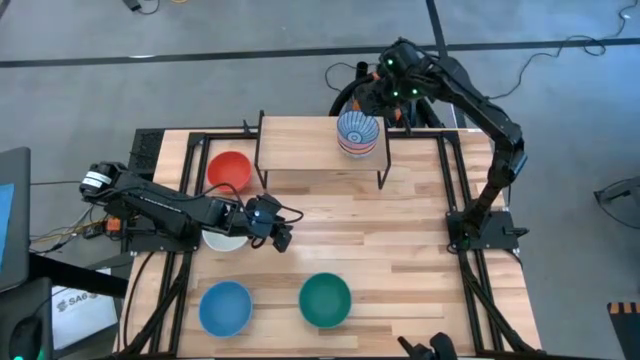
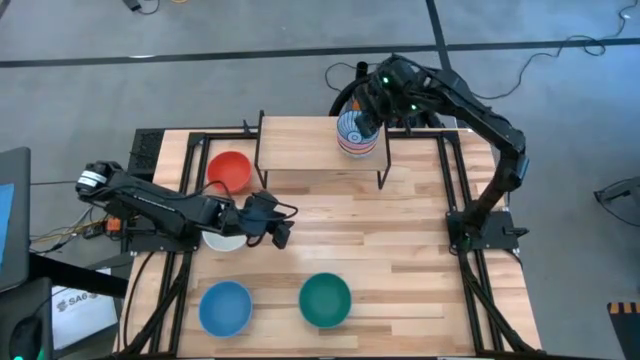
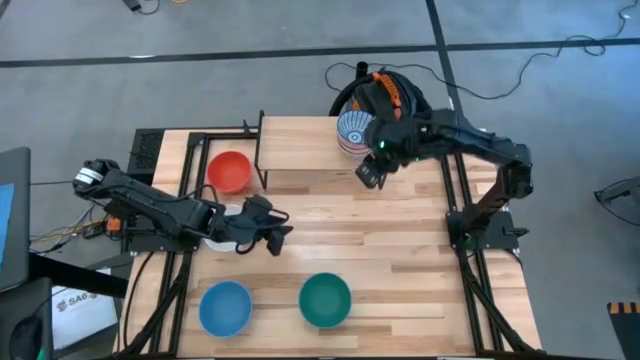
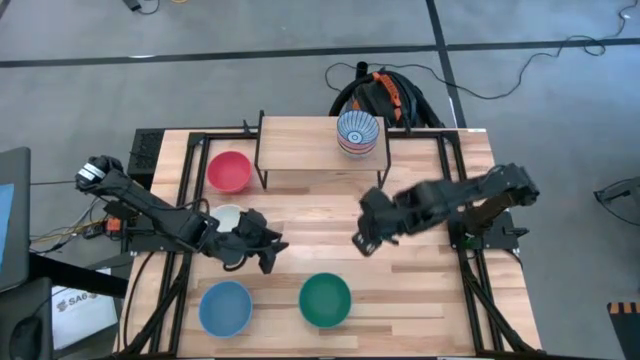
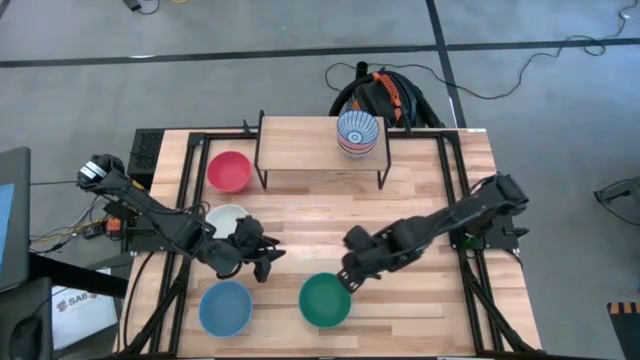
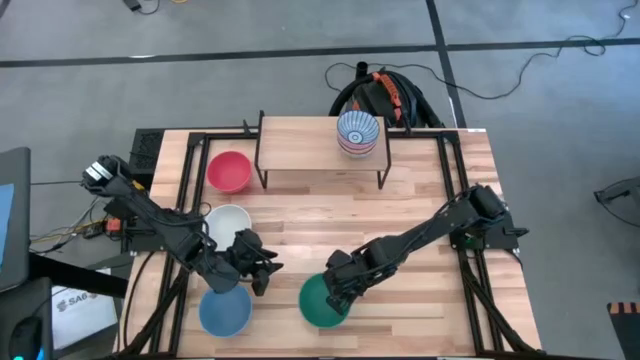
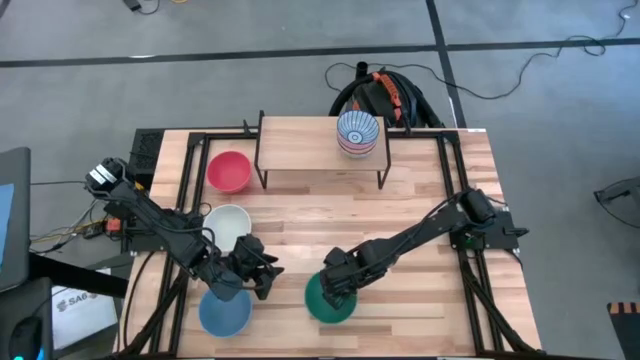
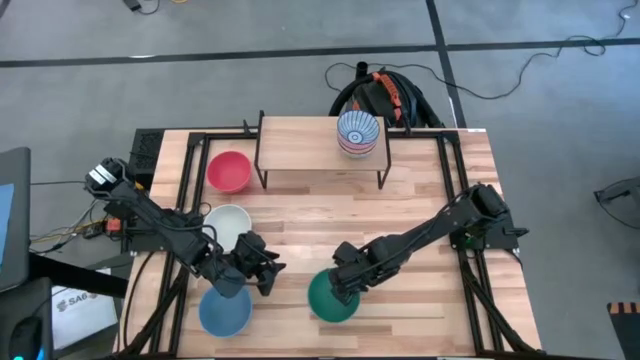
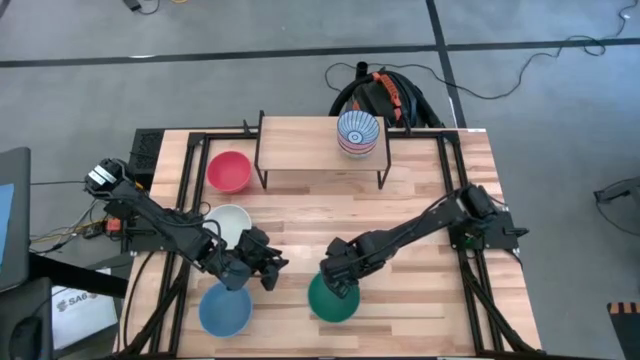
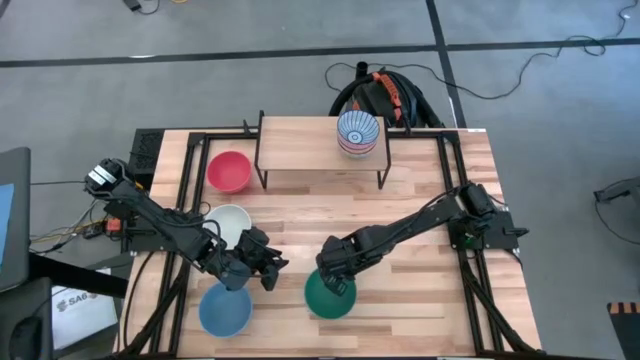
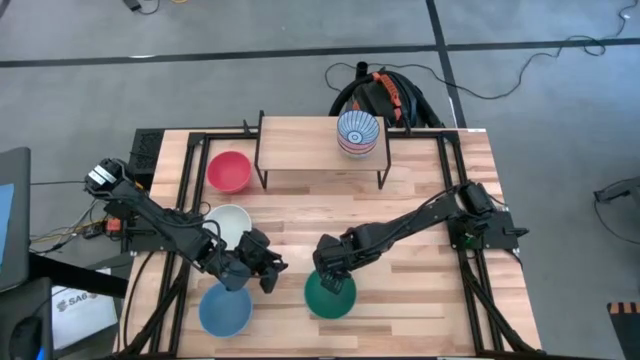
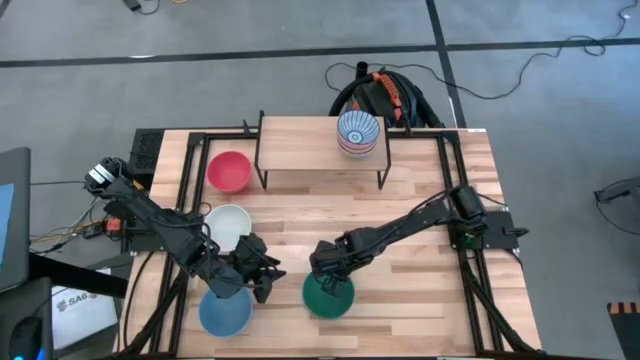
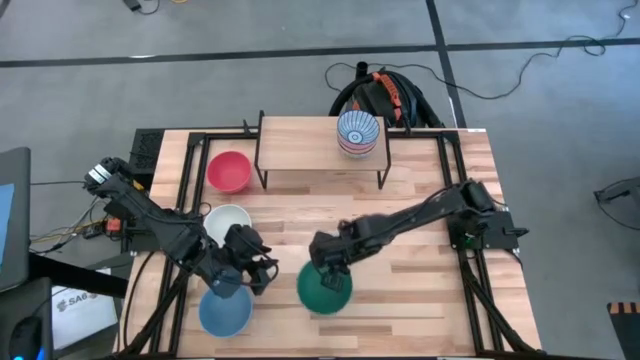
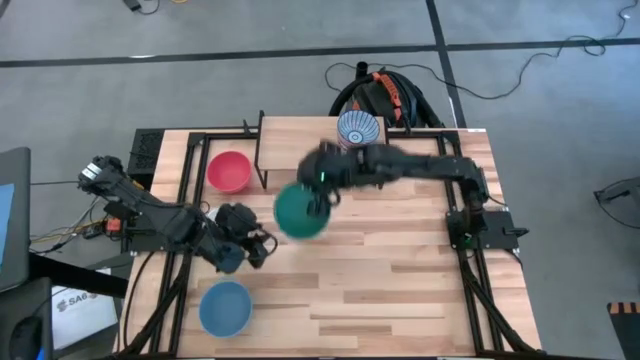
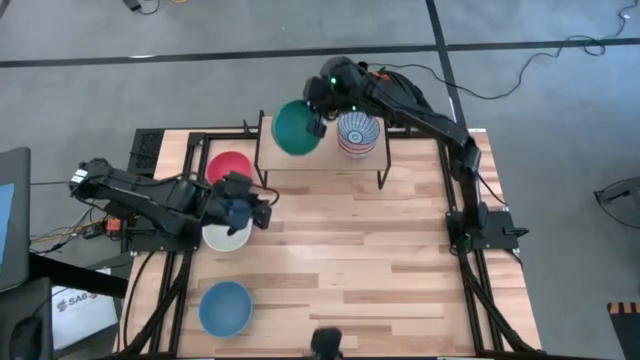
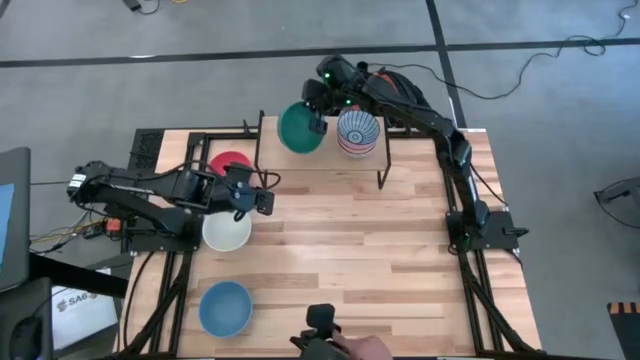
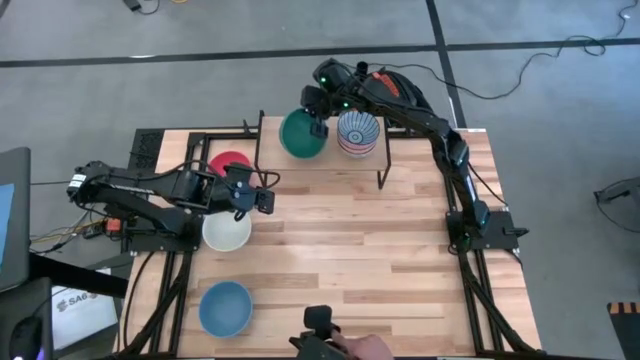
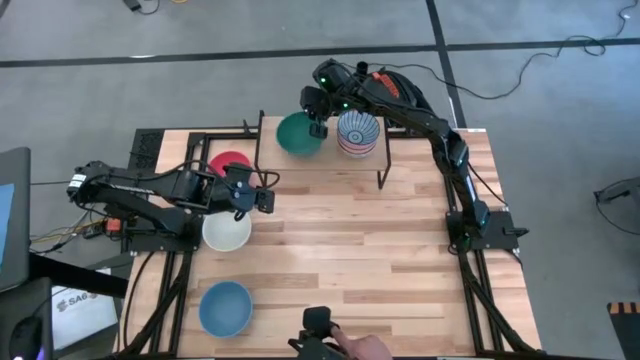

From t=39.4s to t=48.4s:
Task: Place and stack bowls onto a shelf
Put the green bowl on the shelf

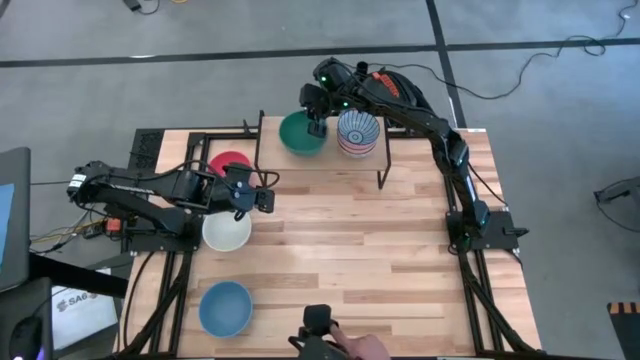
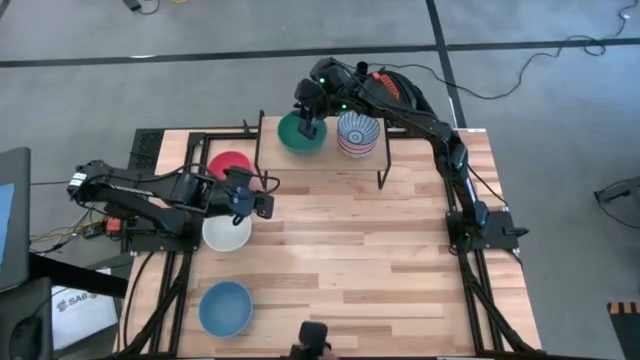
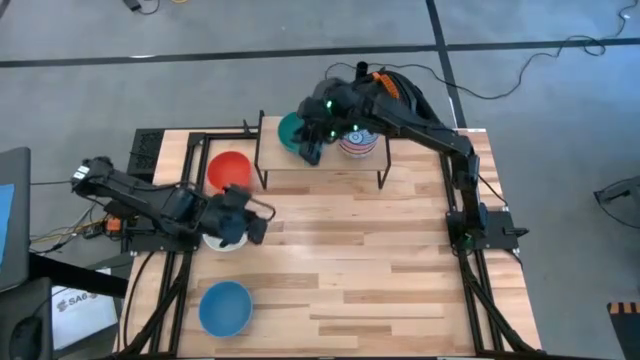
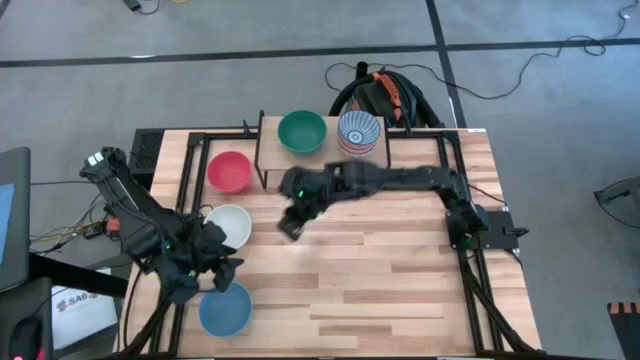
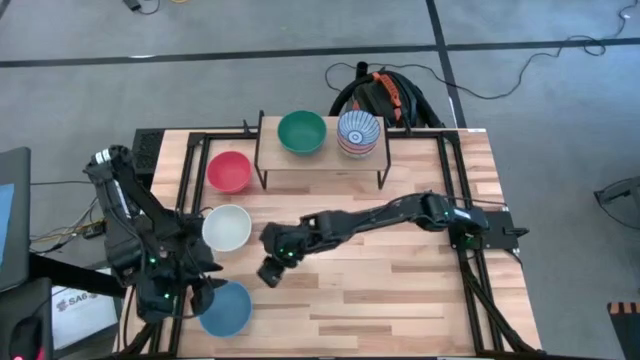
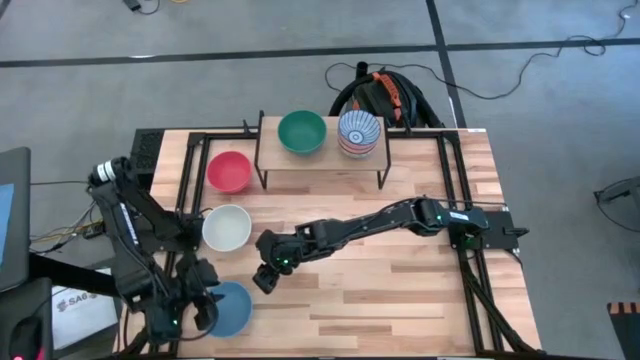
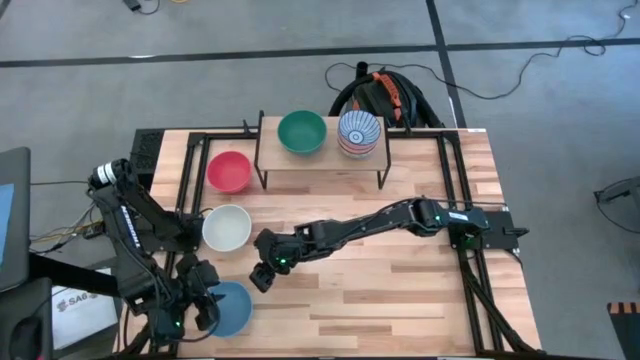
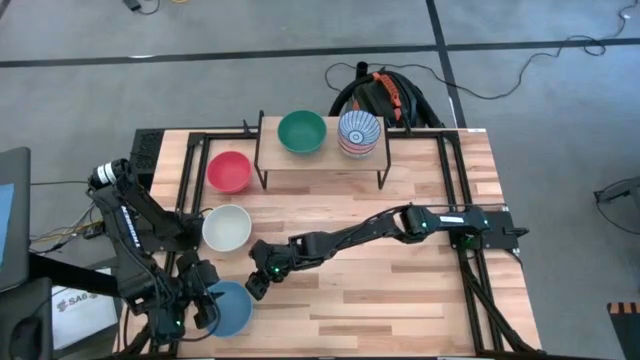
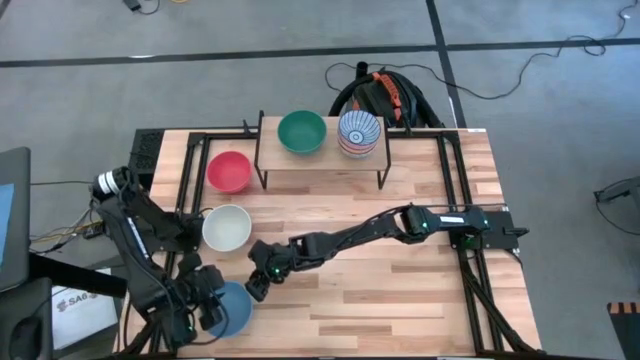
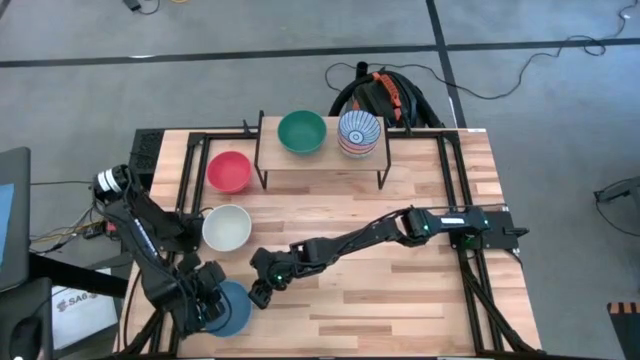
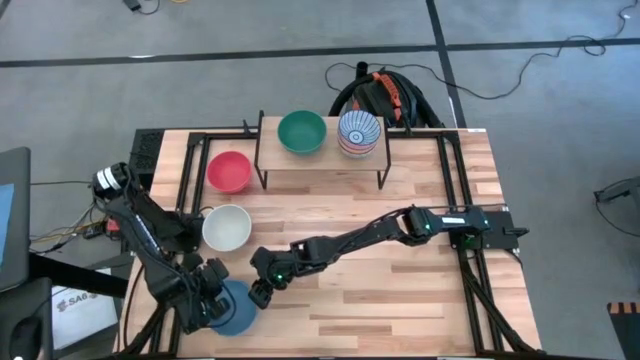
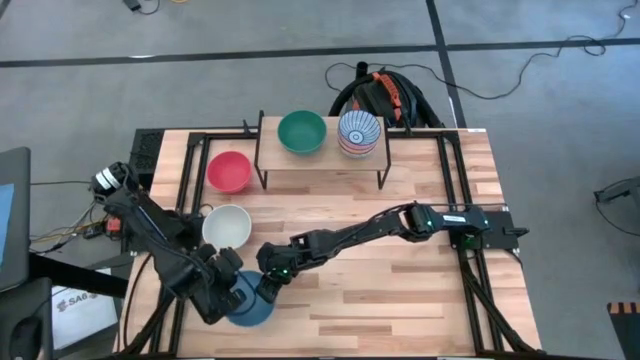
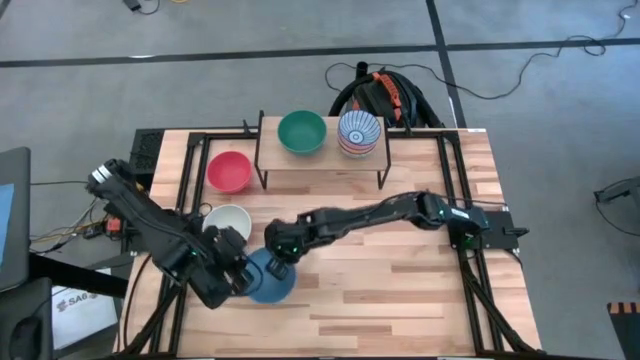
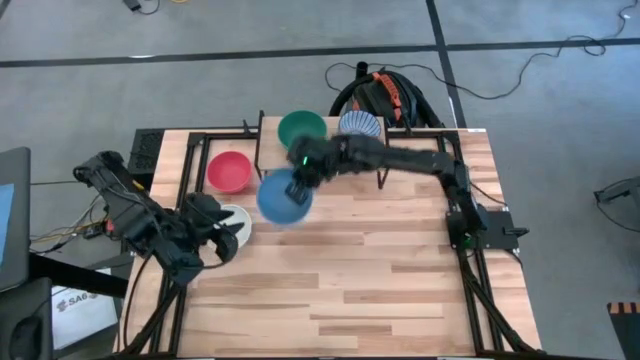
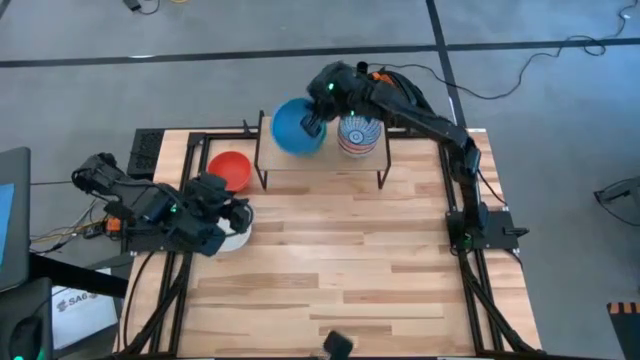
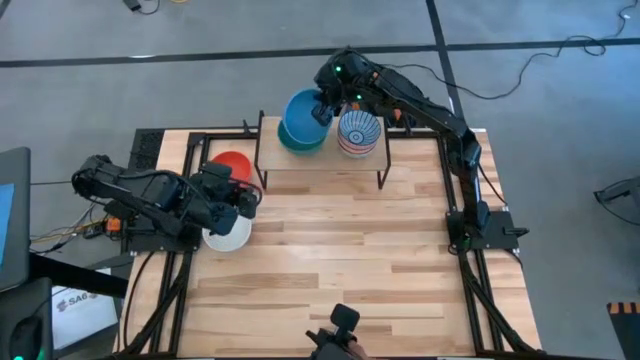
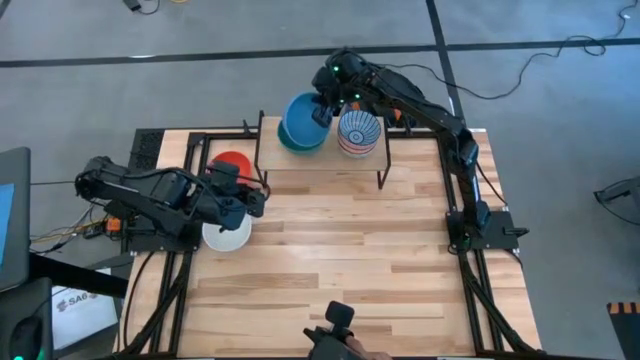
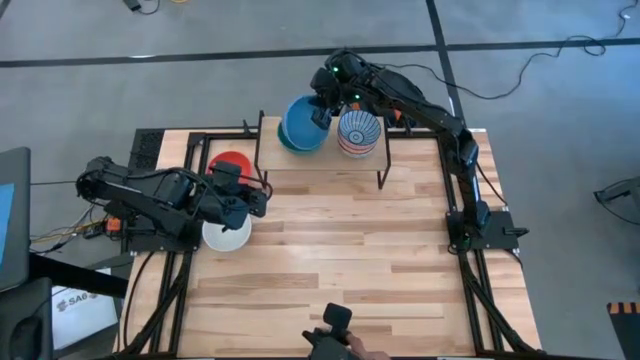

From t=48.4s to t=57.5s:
Stack the blue bowl on top of the green bowl

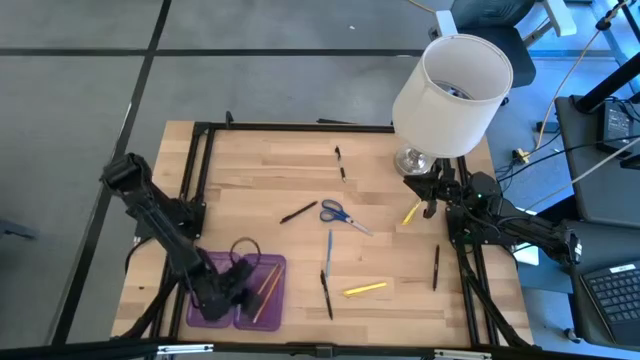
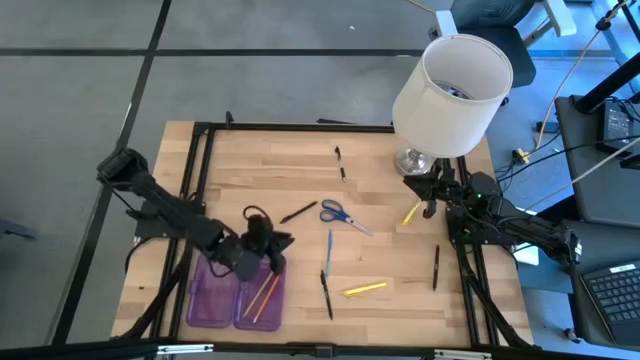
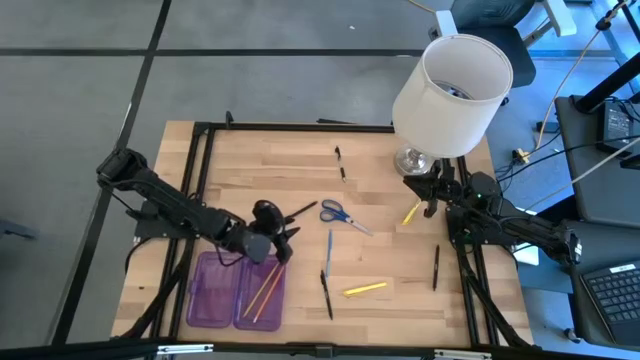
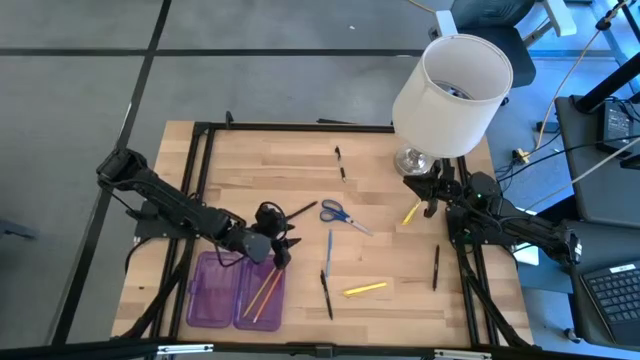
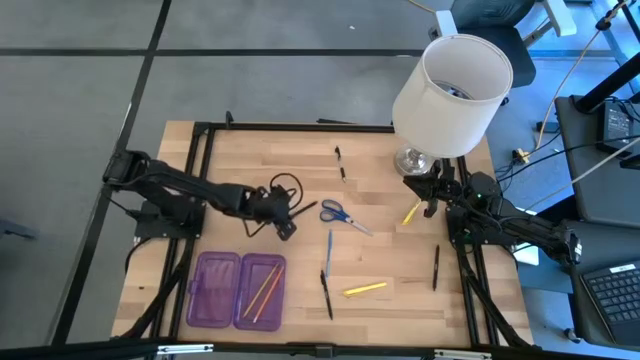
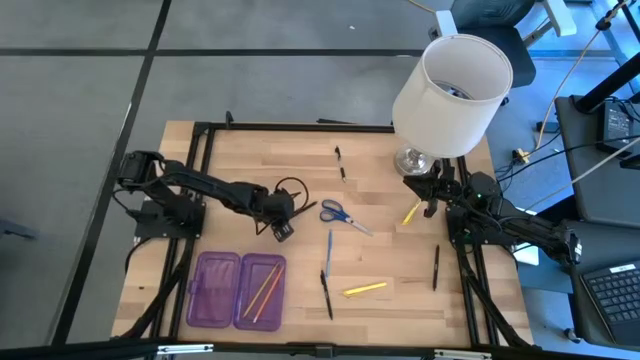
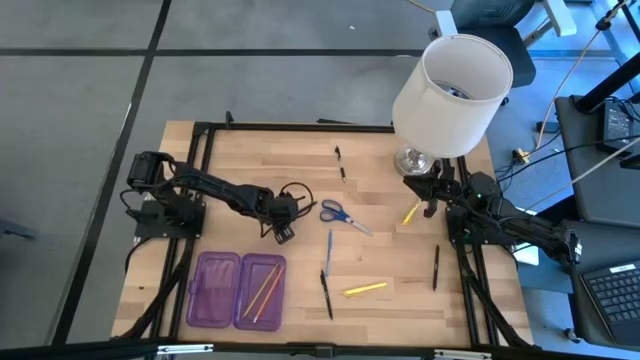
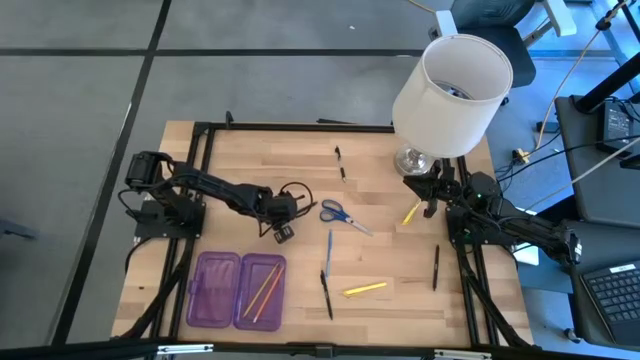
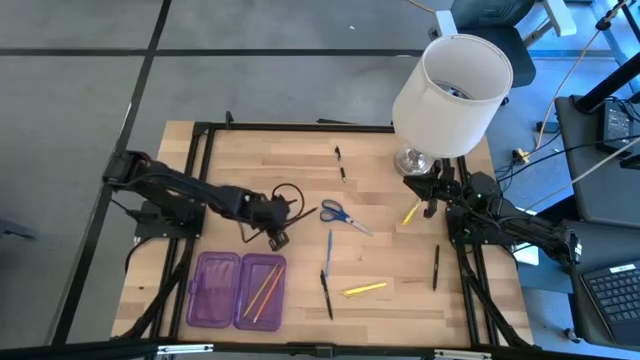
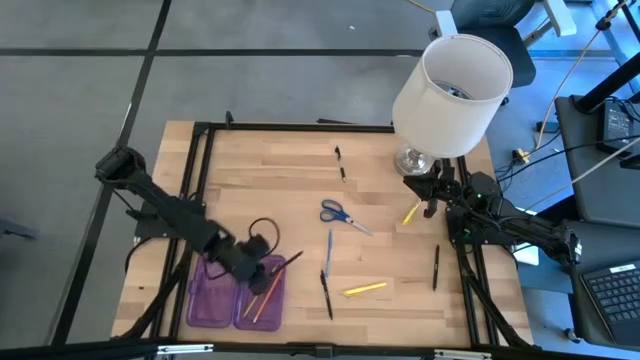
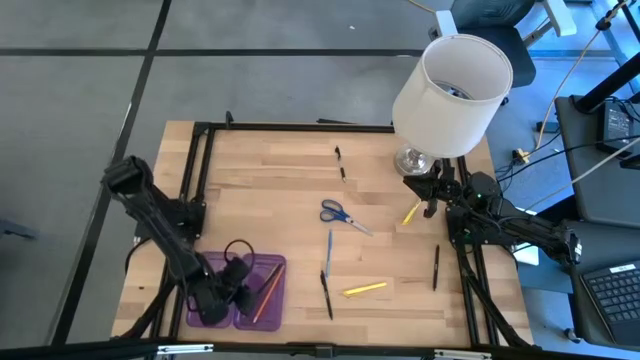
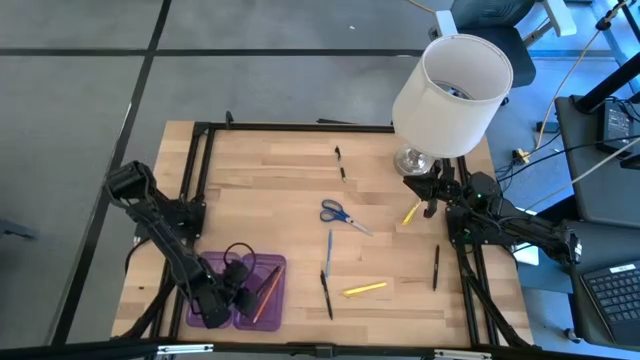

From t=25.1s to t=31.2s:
Task: Pick & place school supplies into a supply box
Put the top black pen into the violet box
